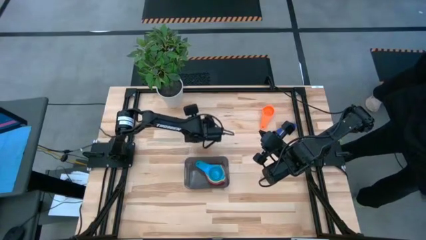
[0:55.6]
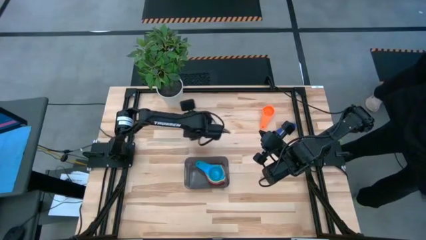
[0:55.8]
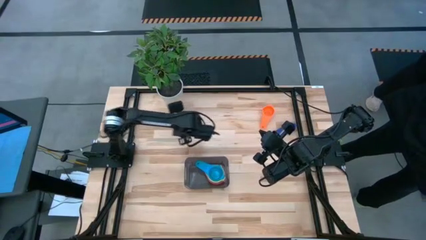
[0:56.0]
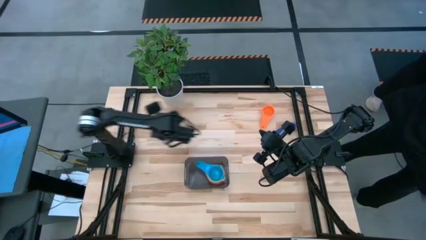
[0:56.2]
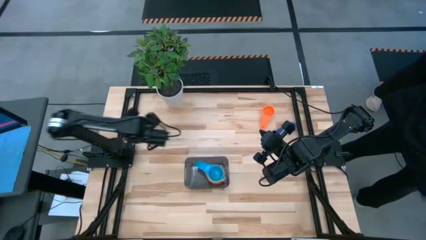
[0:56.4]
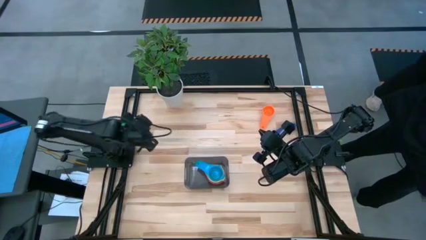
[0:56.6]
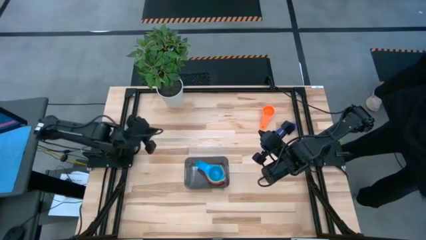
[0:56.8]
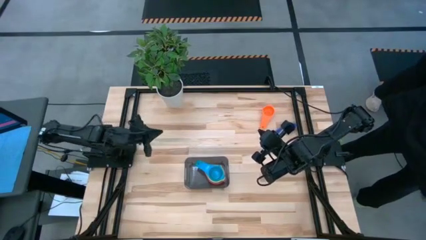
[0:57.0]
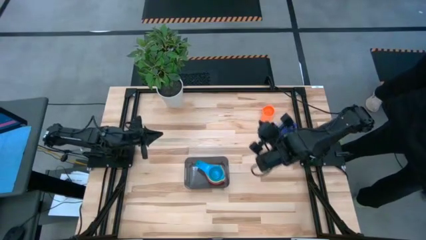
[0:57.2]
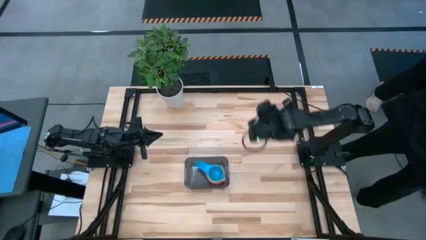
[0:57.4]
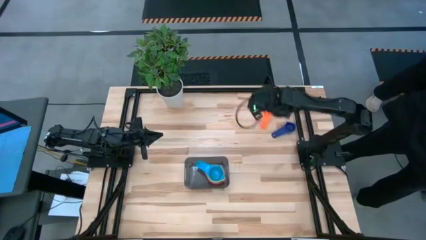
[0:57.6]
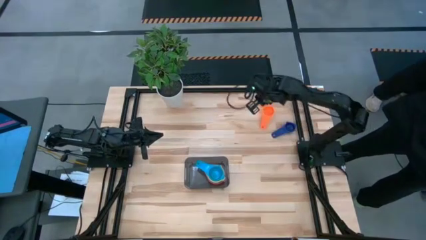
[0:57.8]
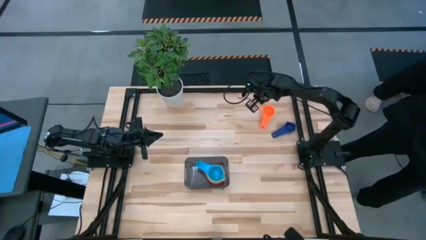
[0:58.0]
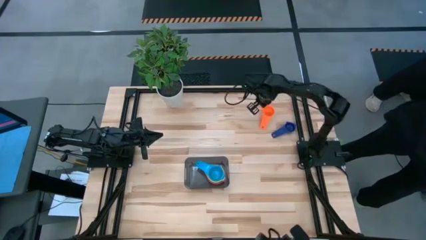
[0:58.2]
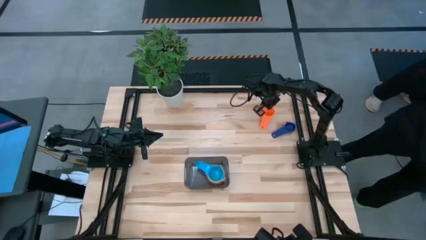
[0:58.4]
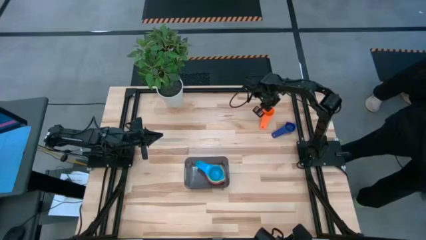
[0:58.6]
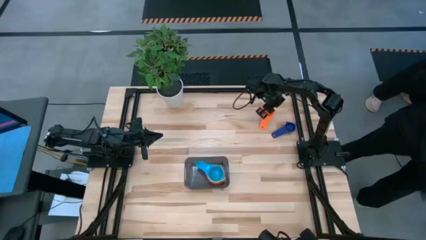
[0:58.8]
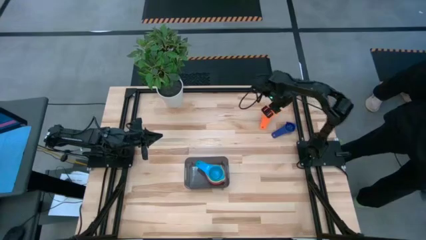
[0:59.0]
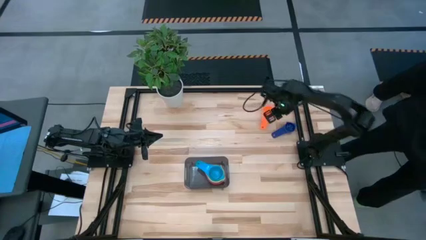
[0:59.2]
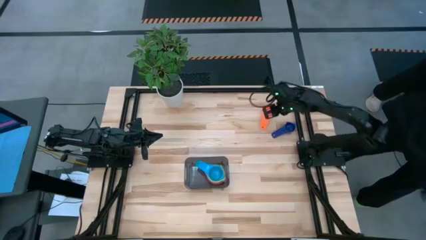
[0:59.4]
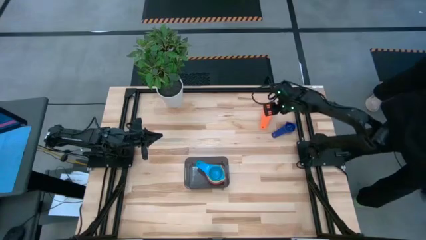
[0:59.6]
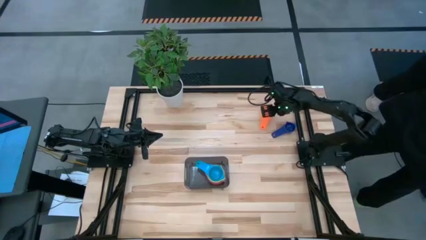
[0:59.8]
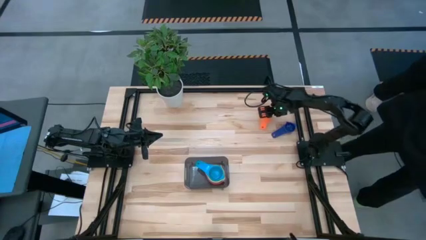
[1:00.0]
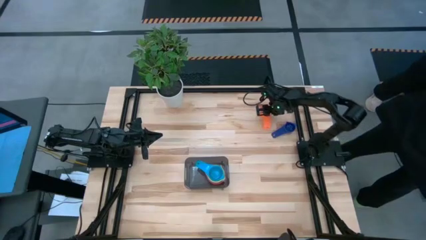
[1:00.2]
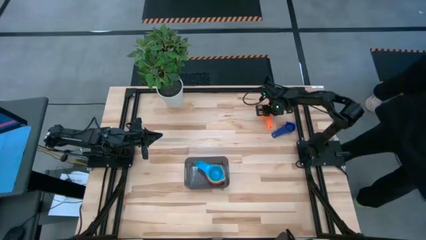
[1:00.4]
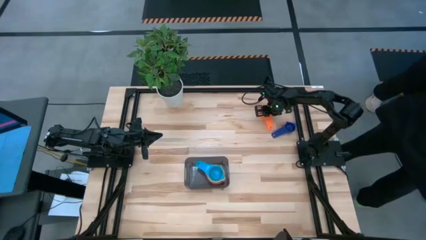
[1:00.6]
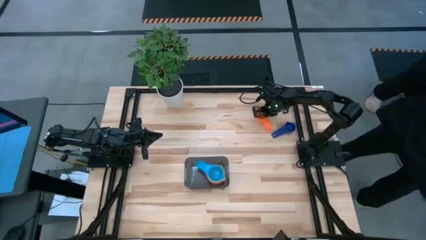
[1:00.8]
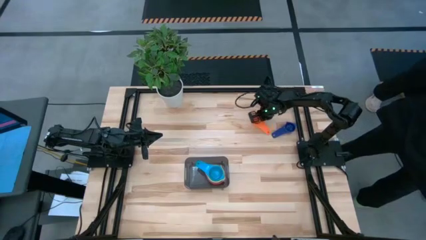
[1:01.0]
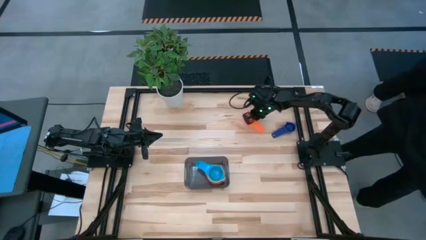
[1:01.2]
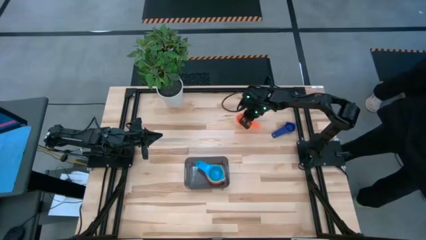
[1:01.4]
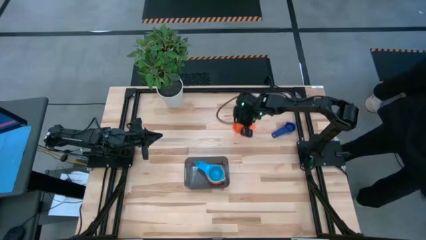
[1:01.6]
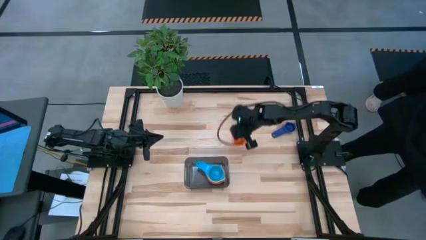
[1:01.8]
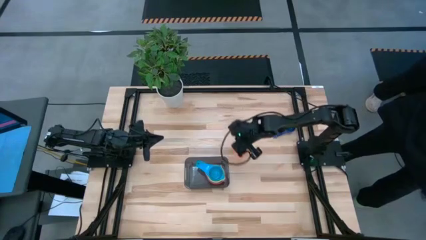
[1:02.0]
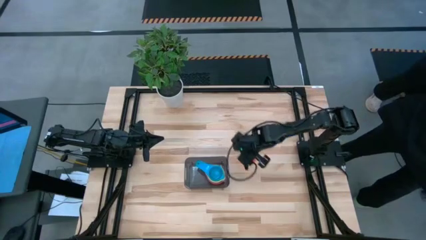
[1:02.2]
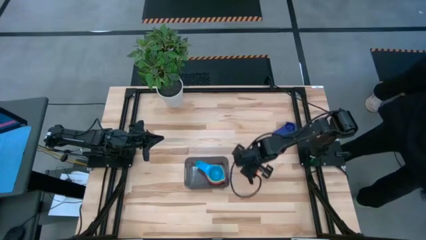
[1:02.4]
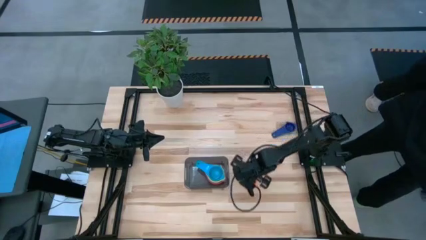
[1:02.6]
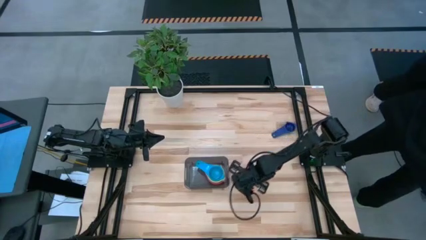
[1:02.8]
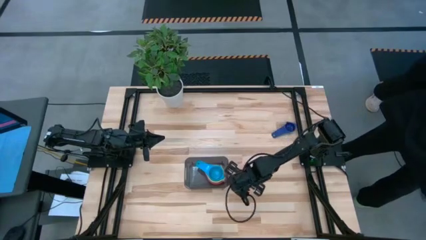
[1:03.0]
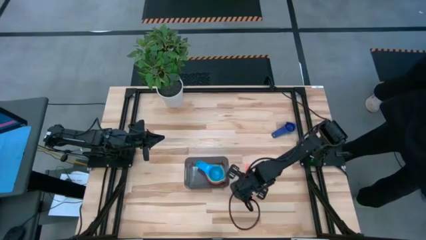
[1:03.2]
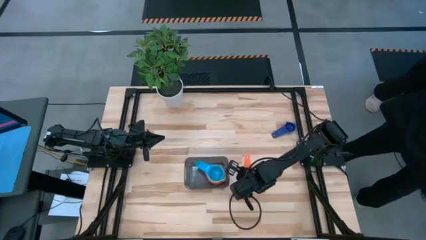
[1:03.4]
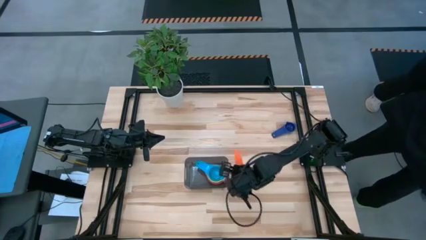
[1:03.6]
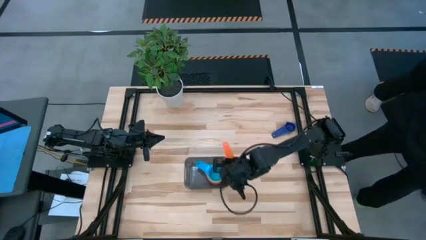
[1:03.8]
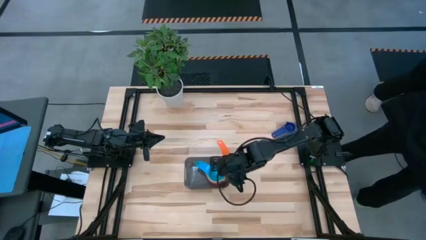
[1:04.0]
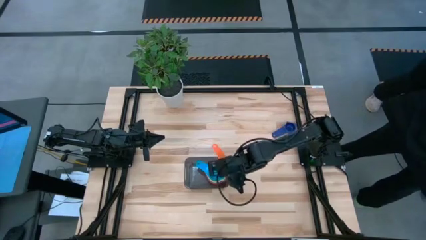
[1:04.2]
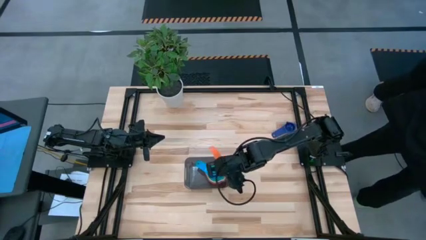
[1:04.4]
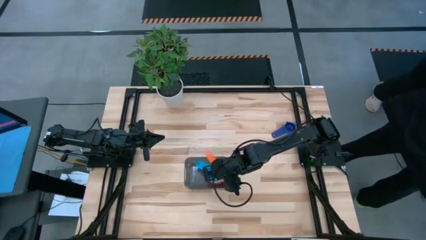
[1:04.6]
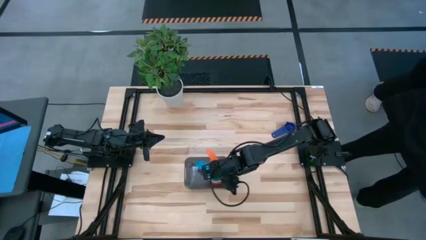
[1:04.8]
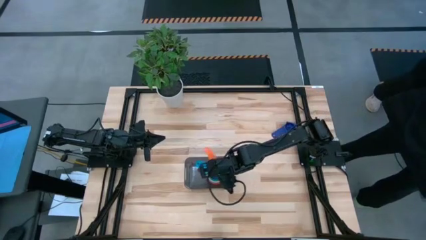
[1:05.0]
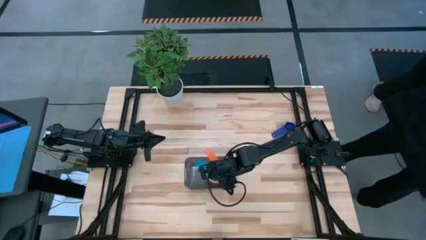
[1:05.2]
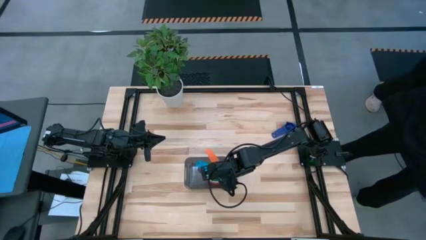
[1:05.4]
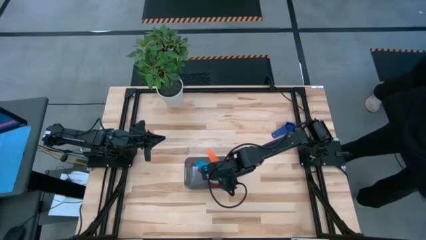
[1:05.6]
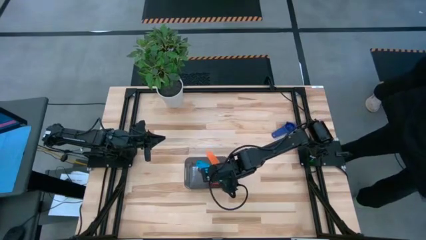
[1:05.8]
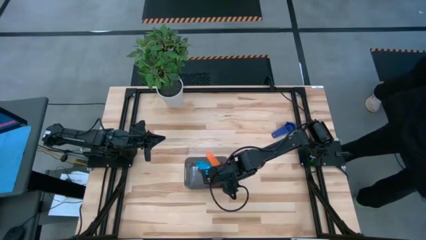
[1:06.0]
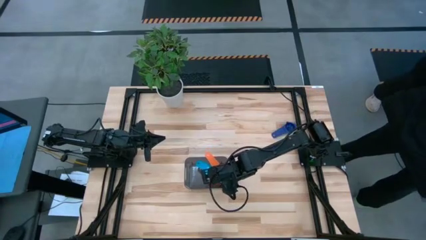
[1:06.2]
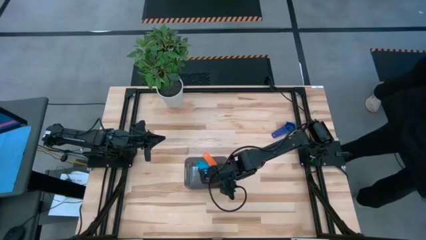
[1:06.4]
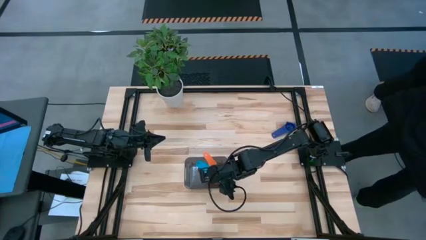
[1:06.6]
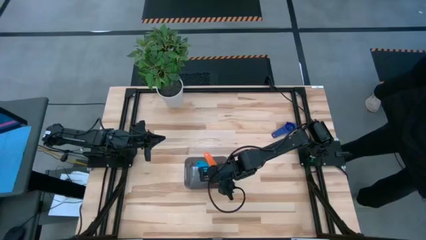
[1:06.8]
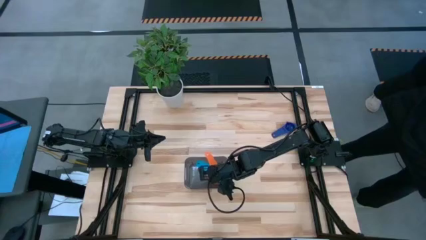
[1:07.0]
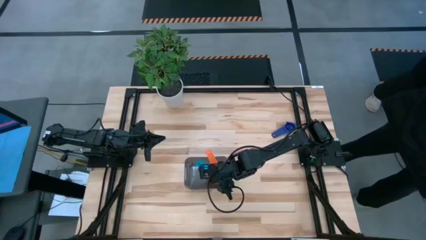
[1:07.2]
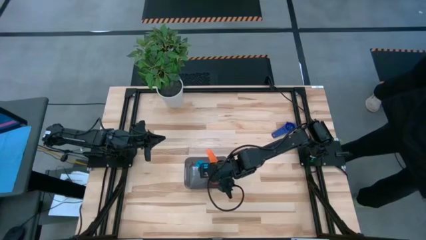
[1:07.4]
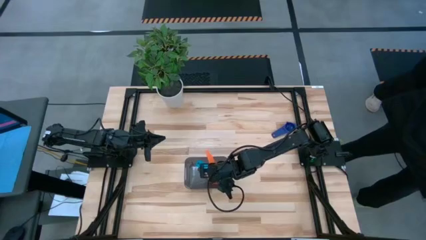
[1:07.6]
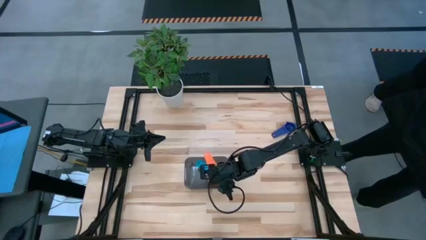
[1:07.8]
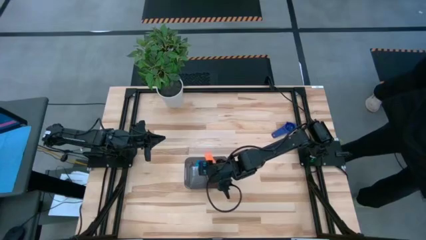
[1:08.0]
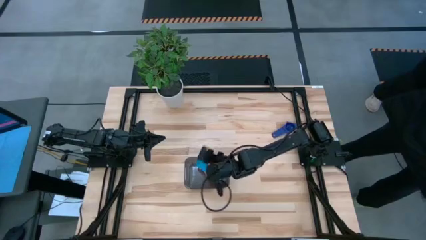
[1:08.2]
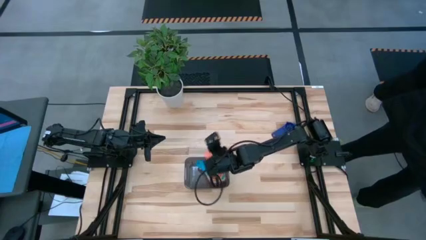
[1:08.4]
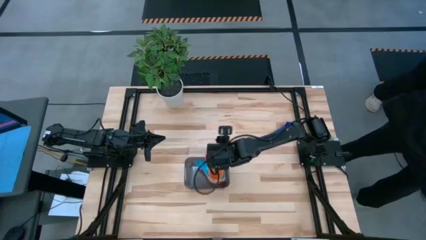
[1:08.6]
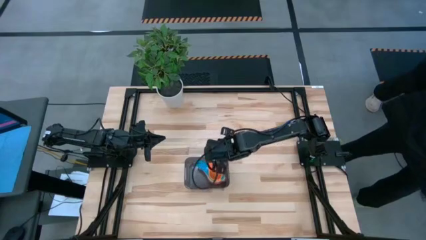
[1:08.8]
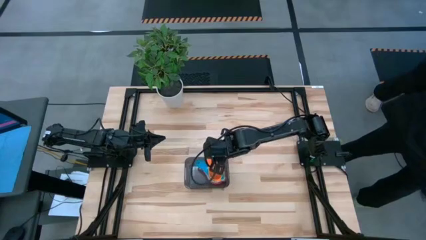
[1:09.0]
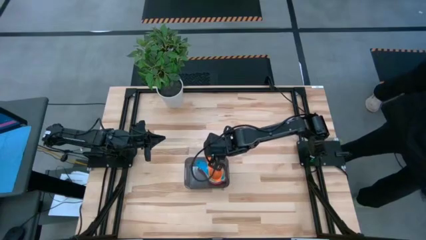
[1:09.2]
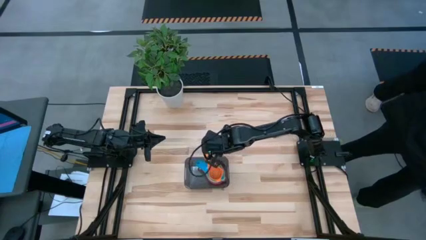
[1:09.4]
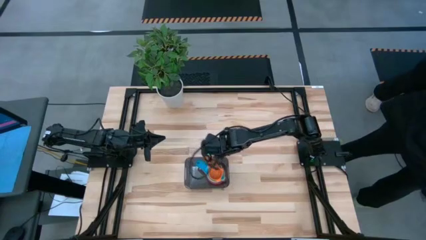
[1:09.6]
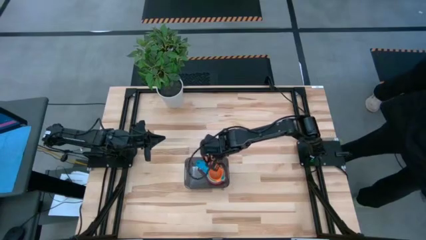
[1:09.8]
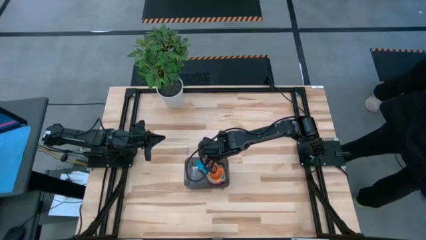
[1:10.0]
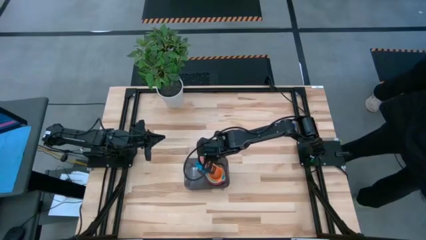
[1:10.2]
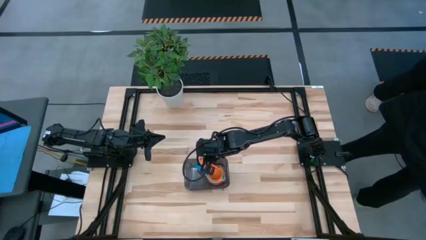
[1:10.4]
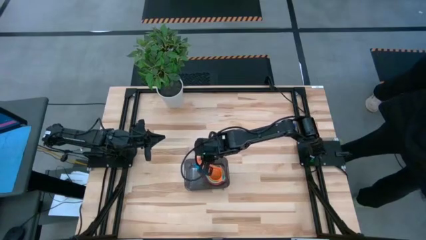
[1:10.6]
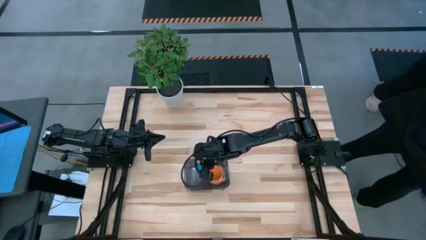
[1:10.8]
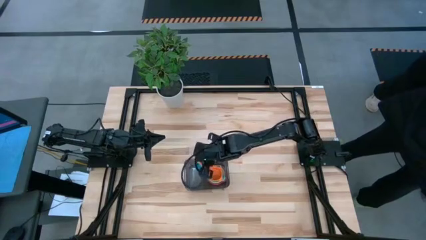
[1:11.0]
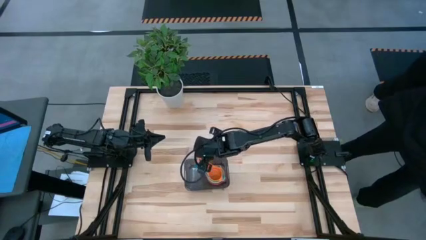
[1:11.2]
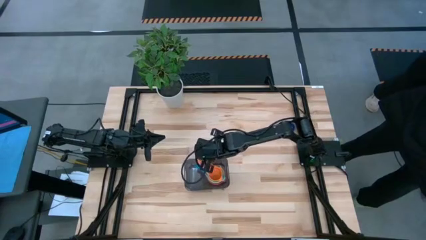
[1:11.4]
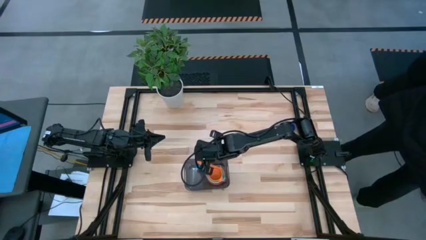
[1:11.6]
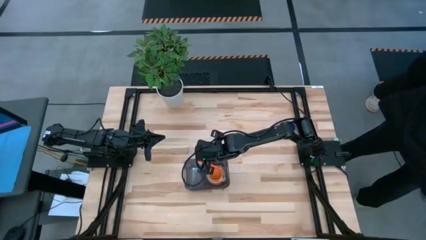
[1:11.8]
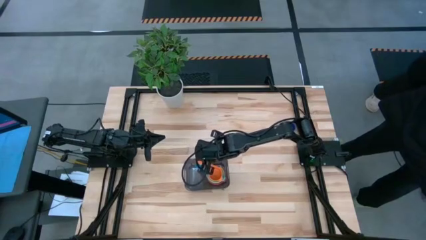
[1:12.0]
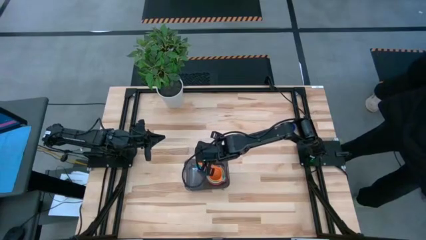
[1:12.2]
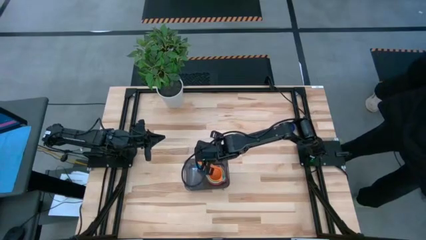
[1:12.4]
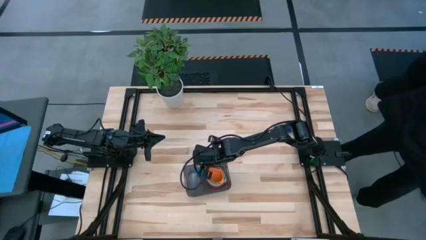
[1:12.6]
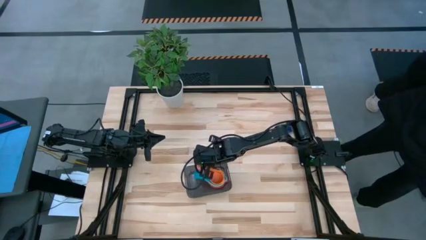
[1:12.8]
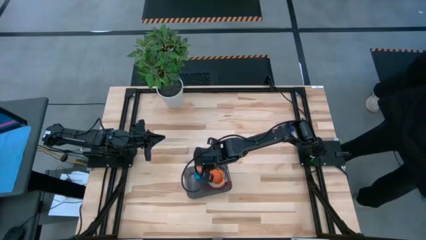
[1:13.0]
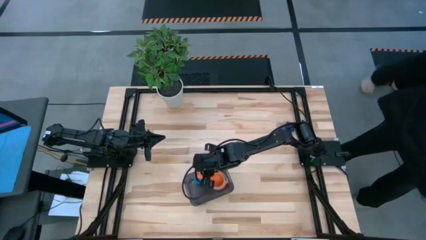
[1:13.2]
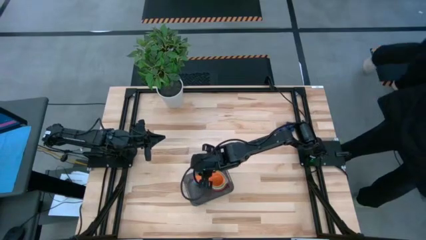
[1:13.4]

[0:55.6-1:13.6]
Task: Nest measuring cups in basket
Stack the orange measuring cup on top of the light blue measuring cup into the black bin
